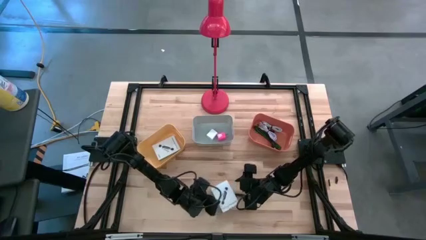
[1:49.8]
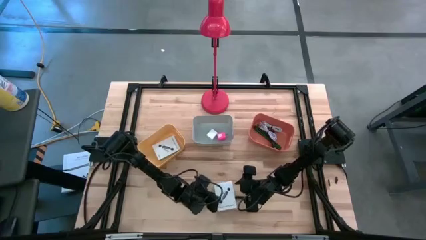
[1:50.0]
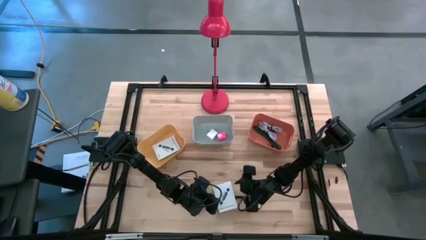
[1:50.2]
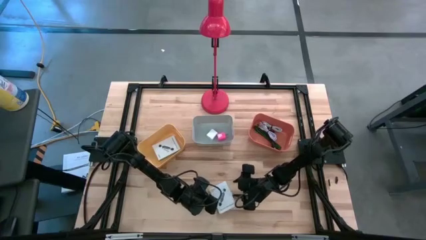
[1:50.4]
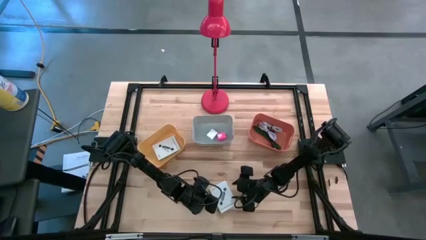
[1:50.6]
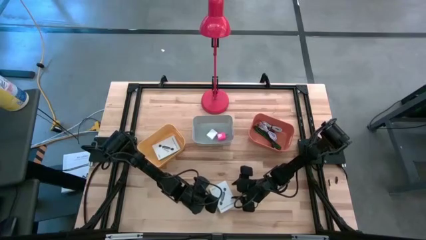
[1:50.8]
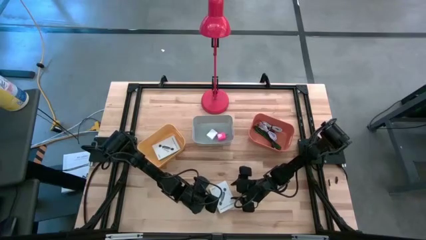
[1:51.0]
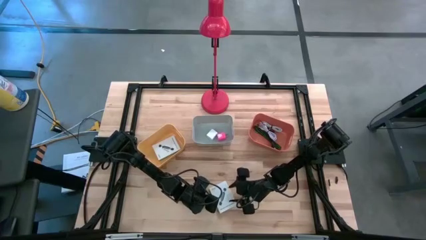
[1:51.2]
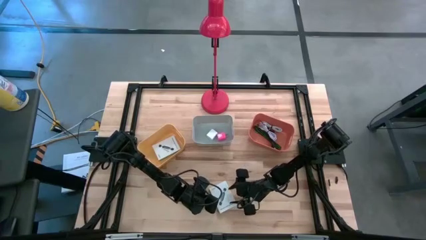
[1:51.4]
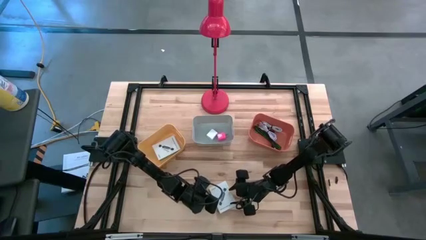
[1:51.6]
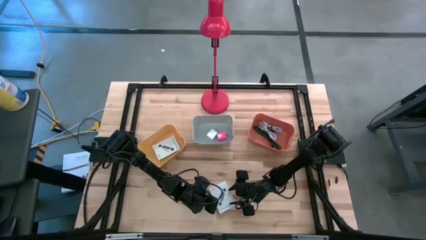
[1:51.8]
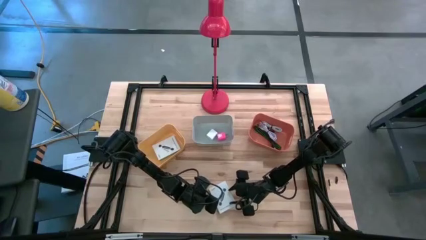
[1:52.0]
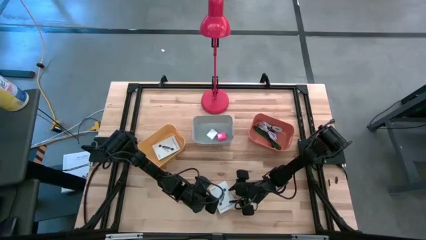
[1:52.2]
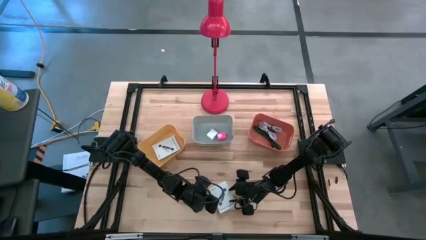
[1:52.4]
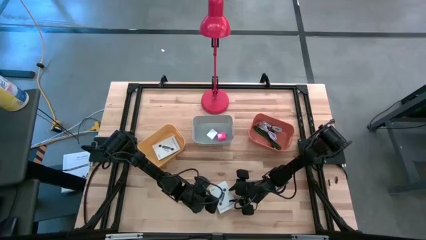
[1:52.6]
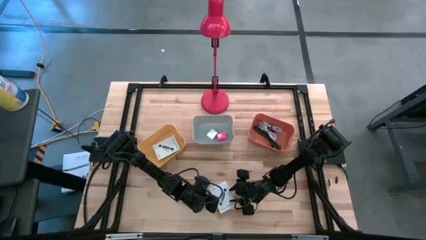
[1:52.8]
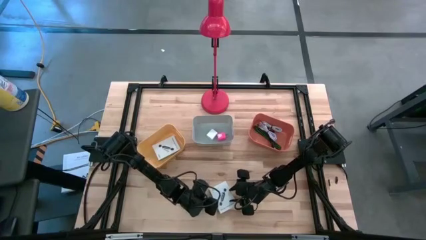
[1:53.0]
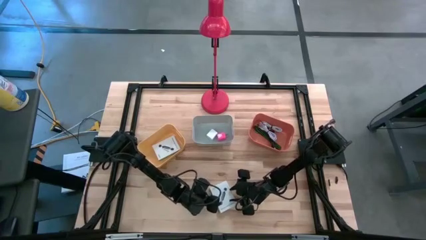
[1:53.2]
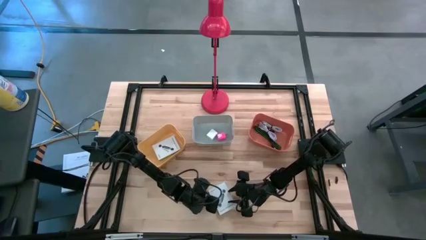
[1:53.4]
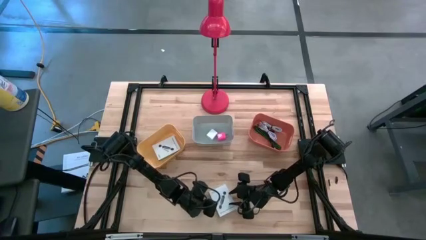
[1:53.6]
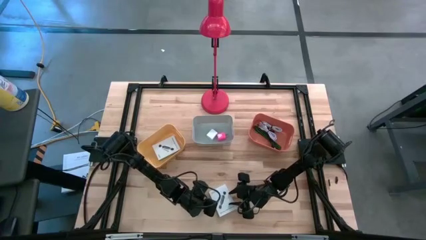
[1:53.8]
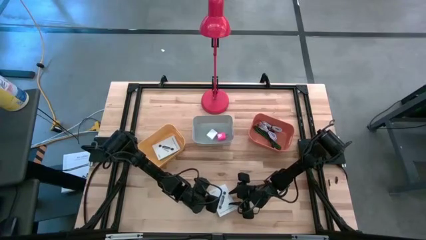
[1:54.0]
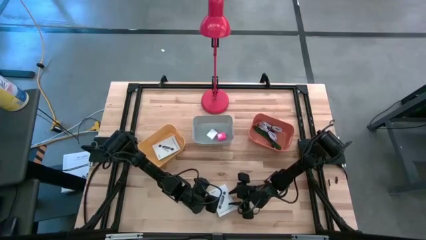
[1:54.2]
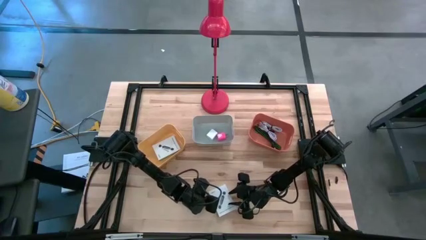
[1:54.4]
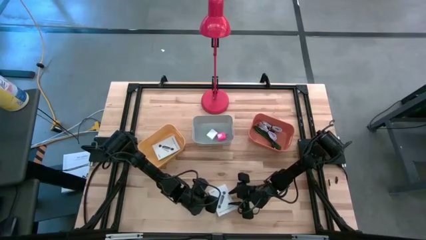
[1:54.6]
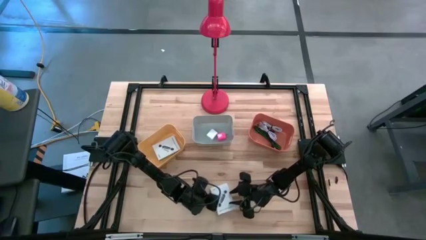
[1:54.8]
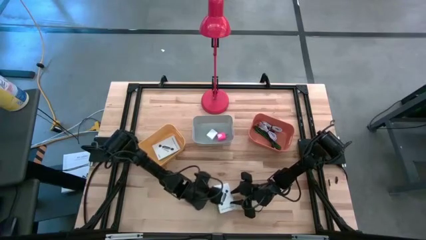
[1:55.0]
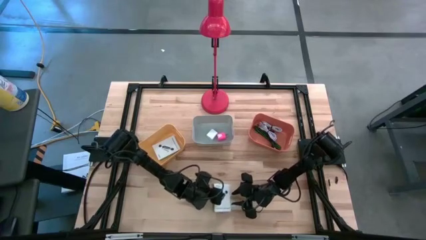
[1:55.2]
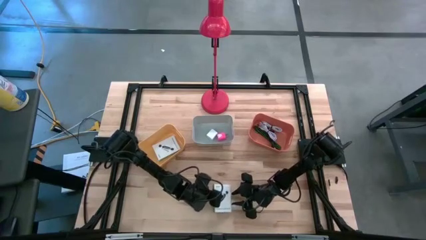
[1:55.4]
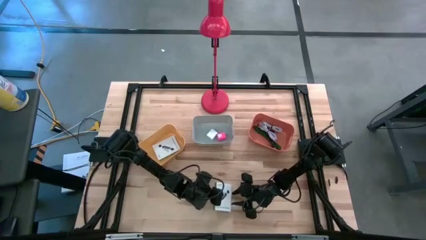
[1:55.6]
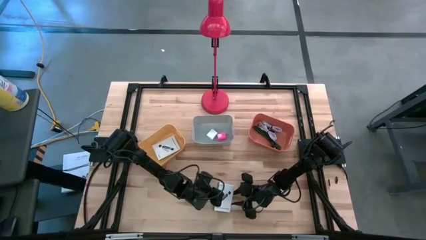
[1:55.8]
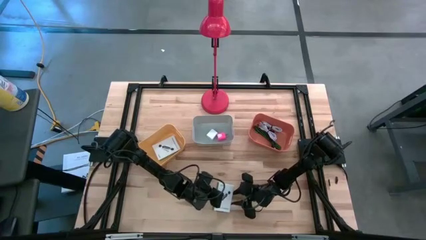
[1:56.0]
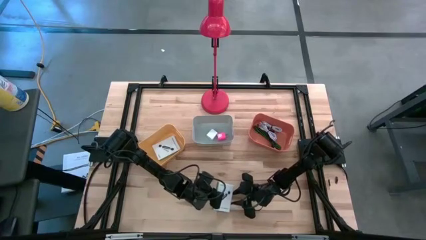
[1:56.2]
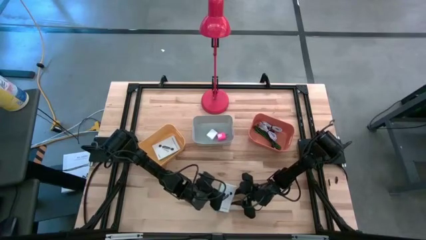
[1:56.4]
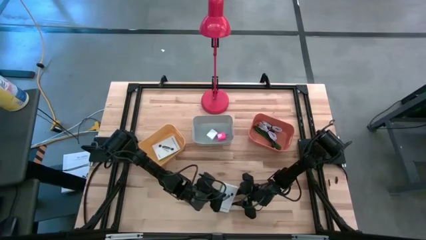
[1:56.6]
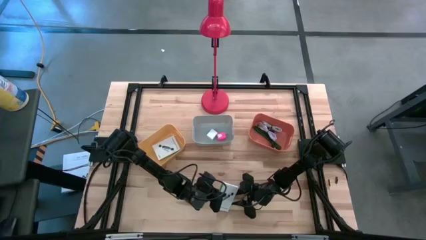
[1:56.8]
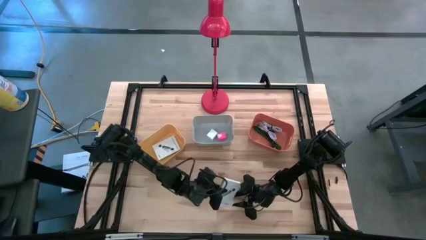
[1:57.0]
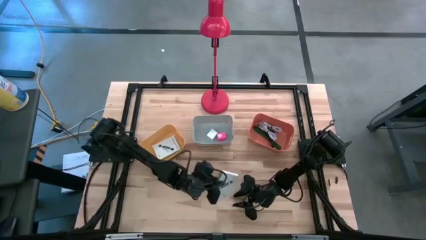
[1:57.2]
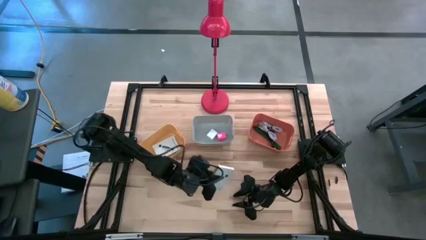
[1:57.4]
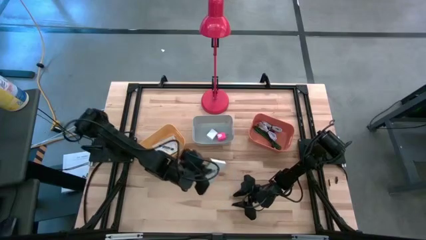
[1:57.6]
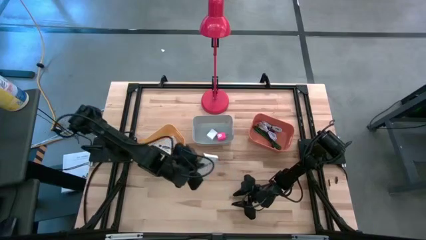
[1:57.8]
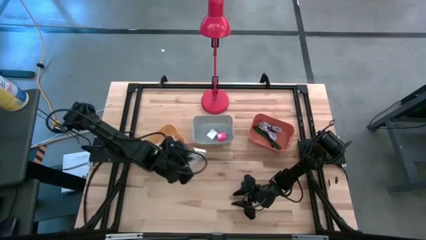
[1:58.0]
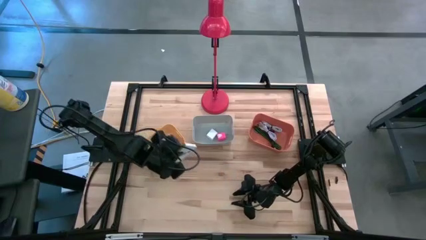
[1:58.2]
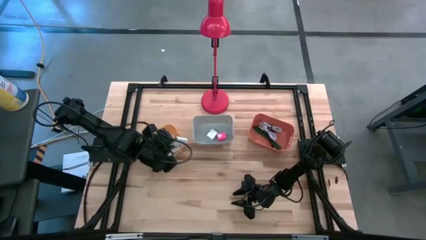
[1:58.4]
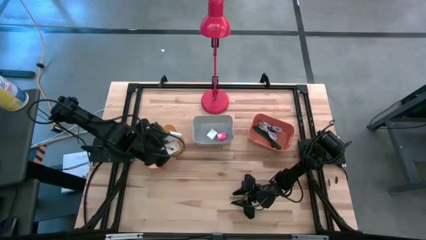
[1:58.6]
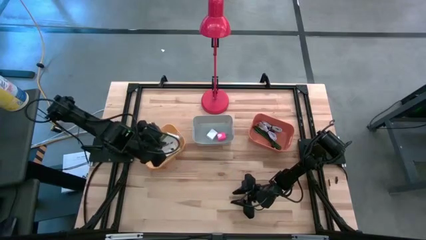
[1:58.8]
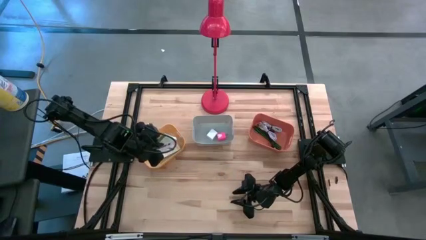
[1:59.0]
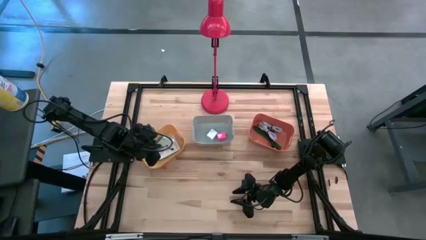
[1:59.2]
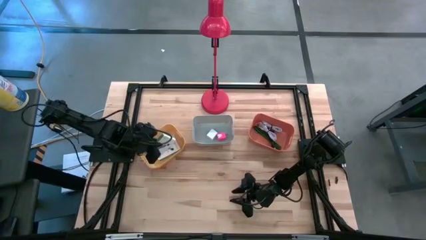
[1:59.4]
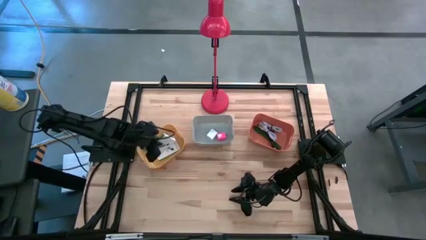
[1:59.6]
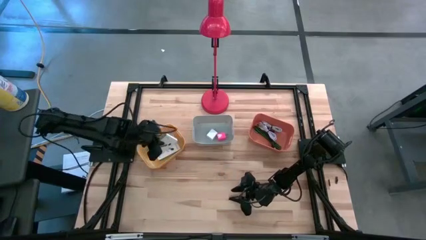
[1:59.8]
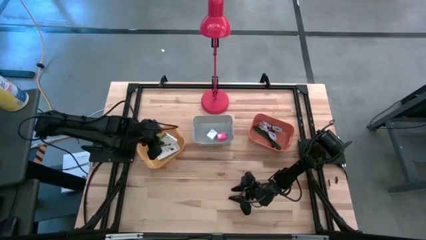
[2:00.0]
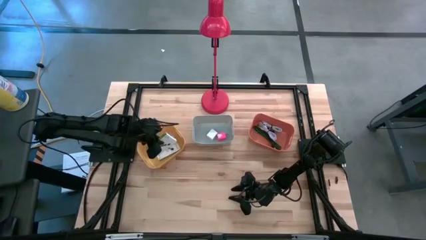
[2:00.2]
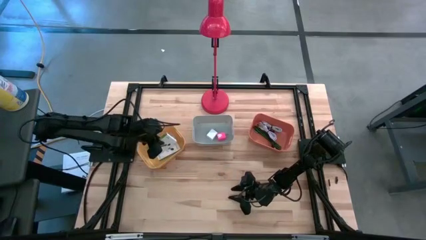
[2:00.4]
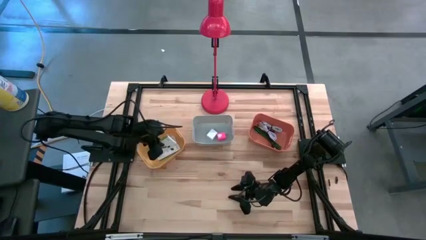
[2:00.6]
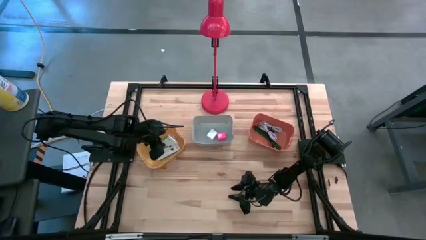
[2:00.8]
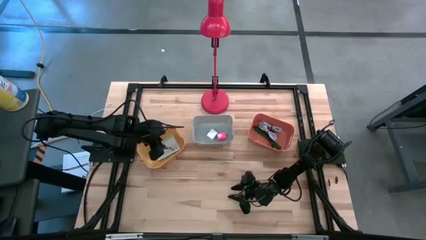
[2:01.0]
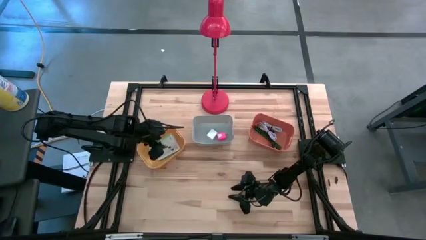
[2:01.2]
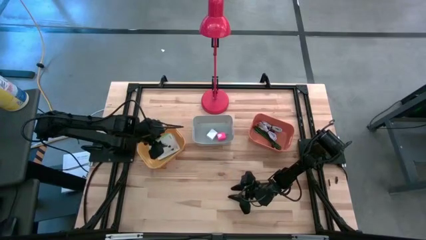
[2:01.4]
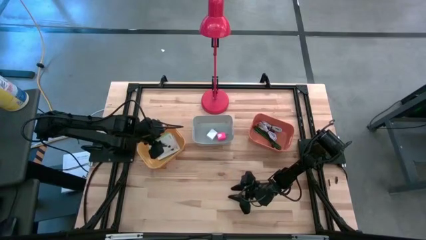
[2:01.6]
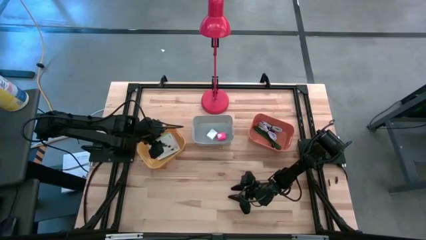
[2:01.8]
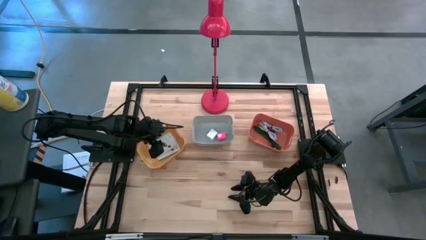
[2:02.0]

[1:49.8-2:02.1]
Task: Pick and place items into bin
Put the white card reader box into the yellow bin
